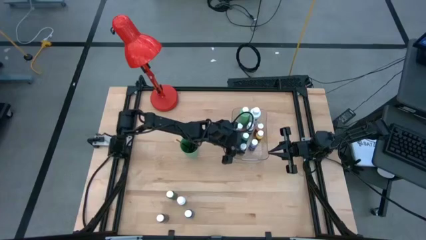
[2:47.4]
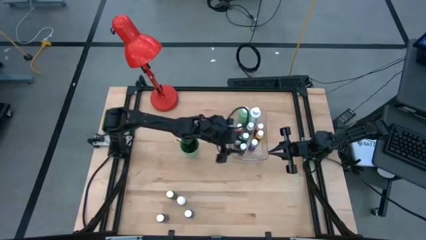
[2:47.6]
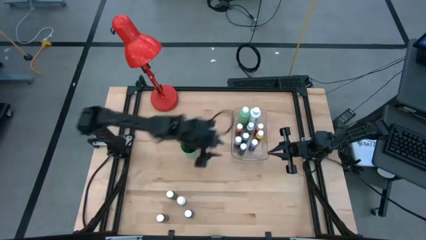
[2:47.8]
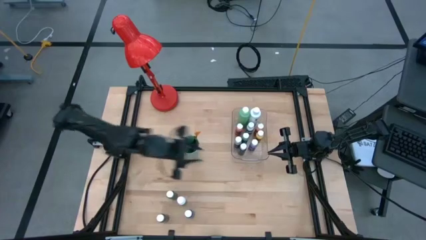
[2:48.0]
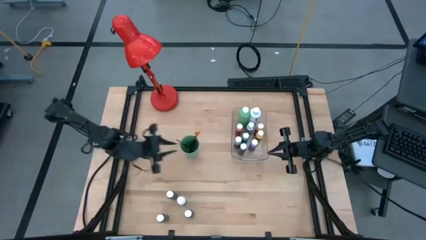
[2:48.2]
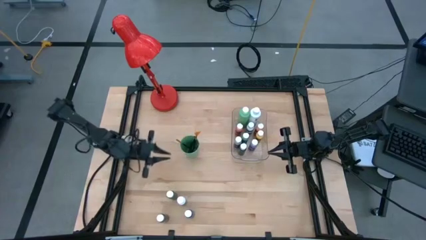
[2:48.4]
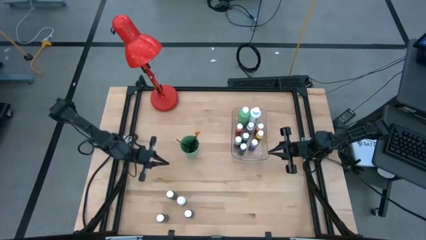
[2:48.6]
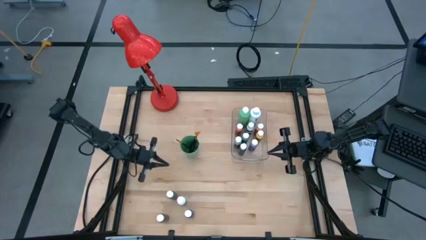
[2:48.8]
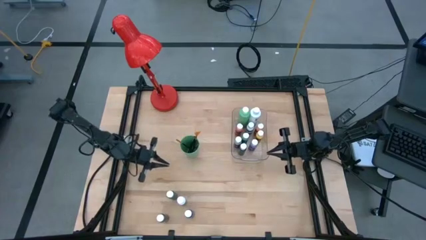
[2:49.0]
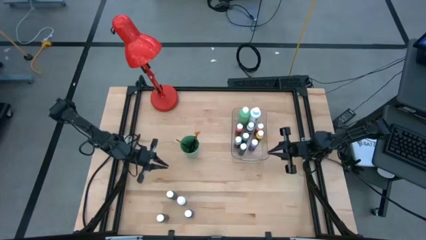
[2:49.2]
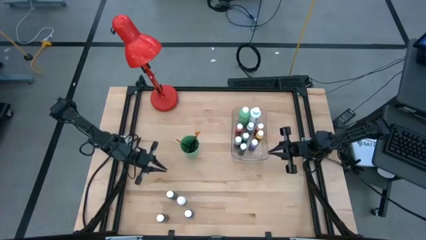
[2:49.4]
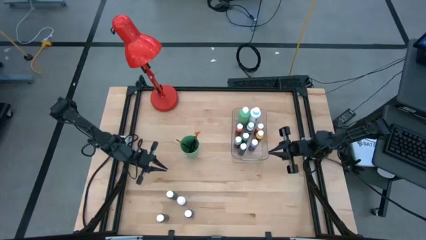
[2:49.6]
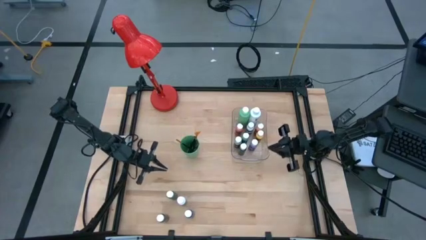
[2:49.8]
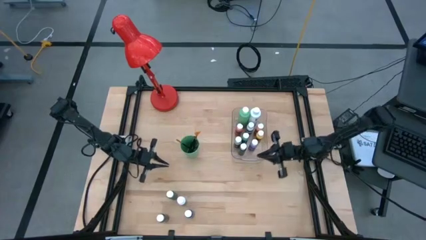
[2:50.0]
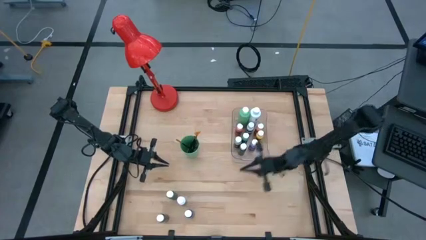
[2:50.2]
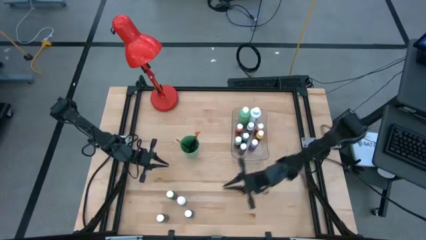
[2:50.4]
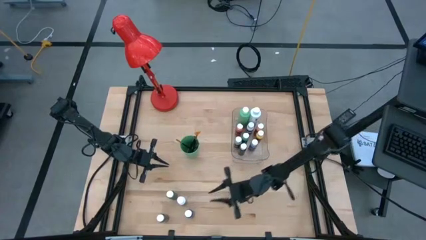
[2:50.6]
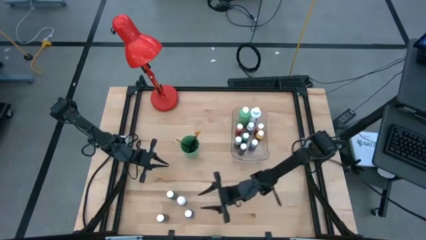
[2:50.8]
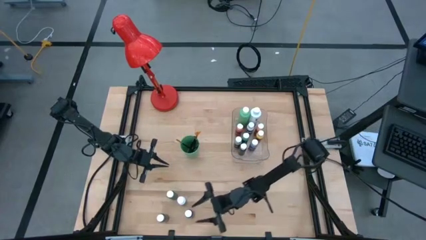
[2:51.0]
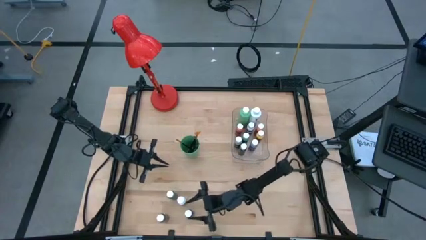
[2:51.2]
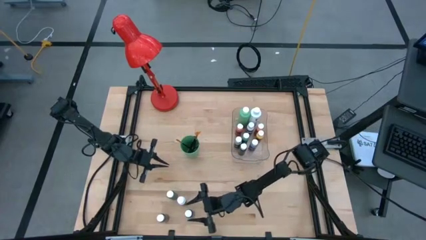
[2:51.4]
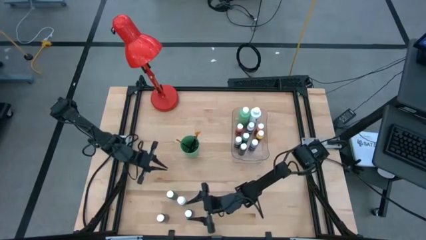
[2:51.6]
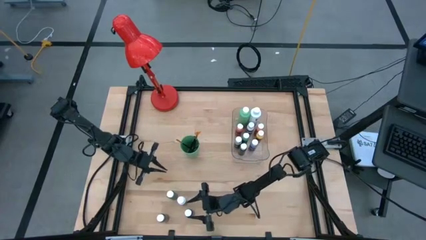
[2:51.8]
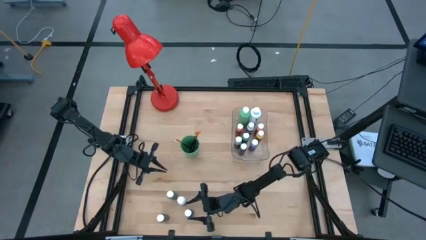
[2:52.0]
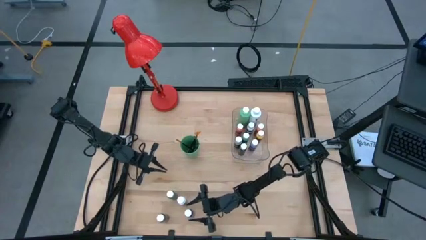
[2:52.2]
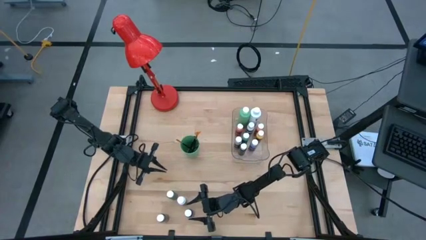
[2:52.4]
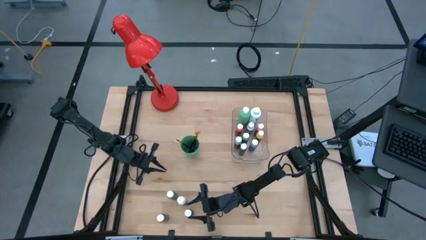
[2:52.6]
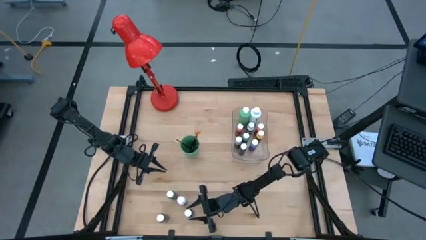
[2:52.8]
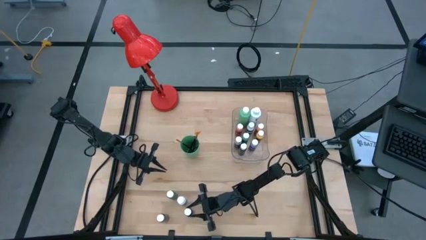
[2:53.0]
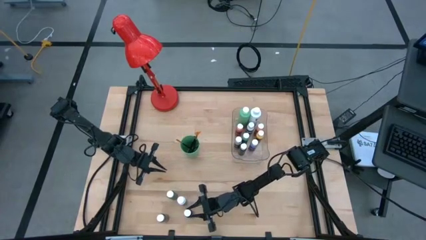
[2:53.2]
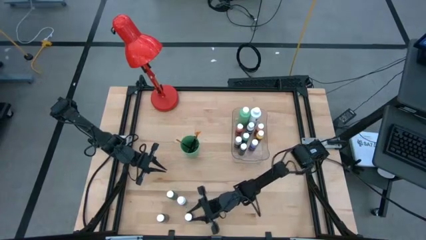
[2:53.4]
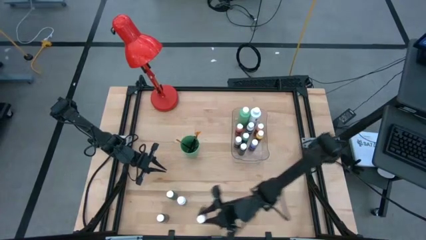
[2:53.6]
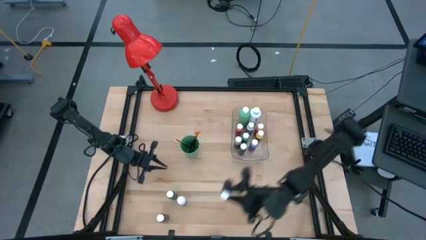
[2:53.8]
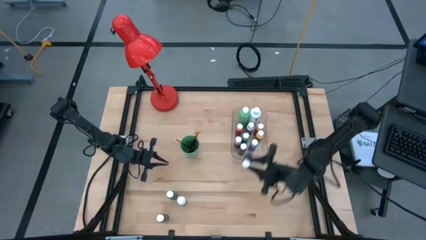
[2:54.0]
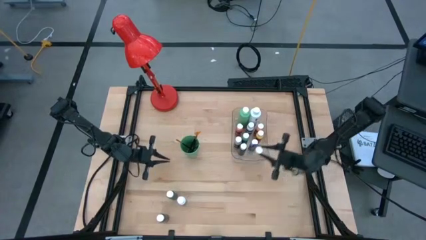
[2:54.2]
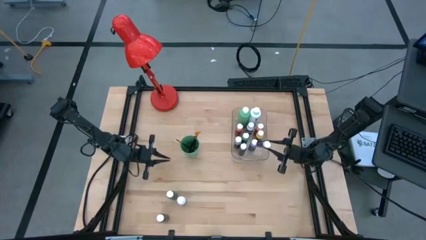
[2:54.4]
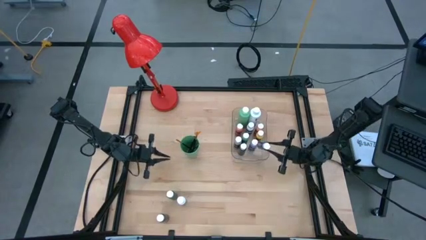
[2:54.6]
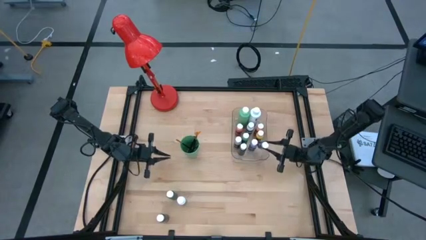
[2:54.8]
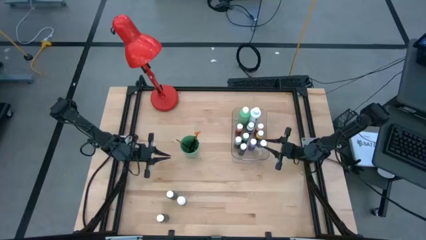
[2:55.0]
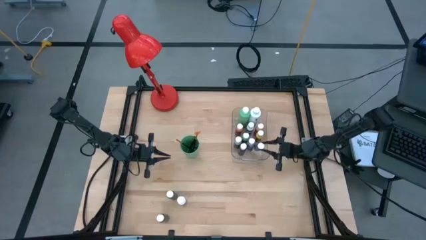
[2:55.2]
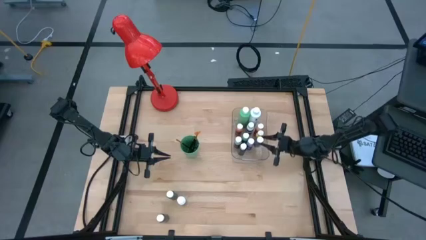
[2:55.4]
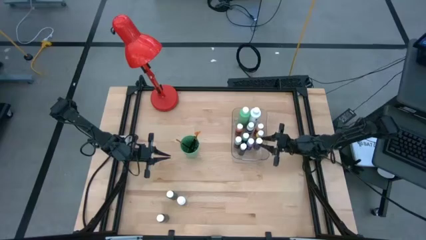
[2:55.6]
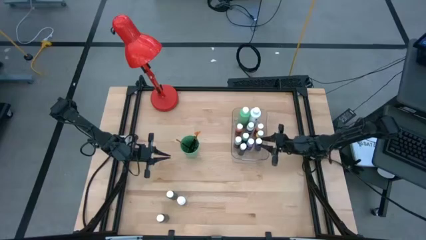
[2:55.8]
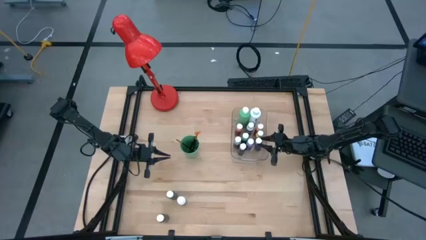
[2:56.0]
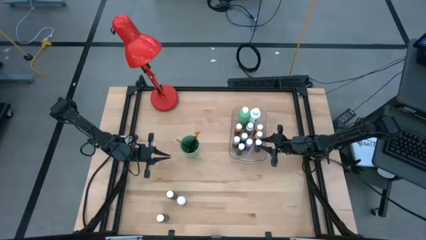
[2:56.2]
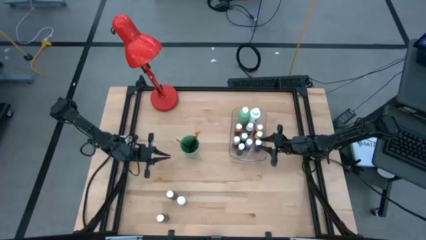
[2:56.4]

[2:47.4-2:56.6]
Task: Pick & Place Paint Supplies
Put the small blue paint bottle into the transparent bin

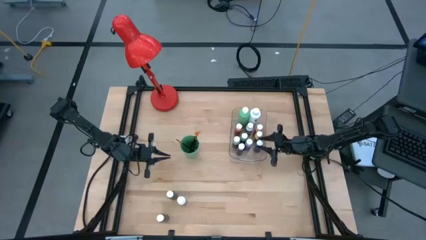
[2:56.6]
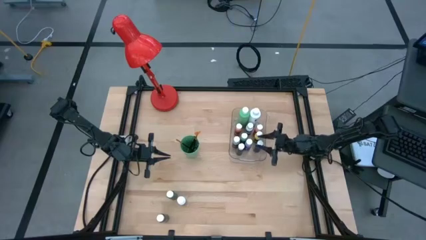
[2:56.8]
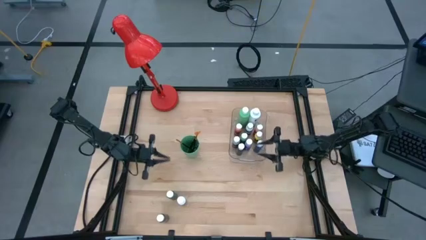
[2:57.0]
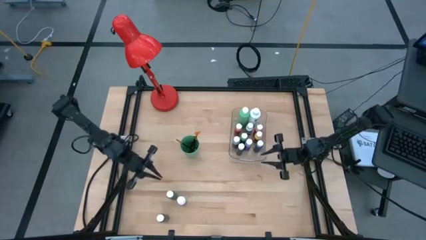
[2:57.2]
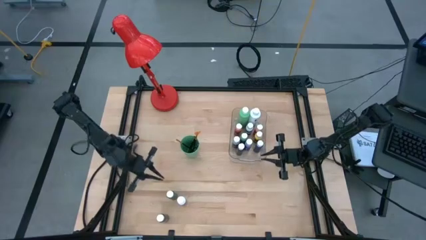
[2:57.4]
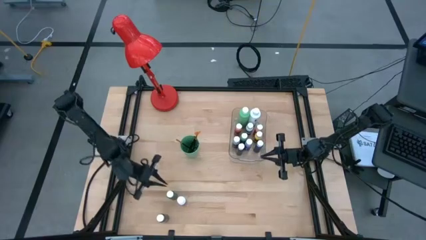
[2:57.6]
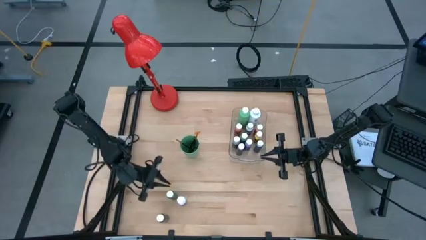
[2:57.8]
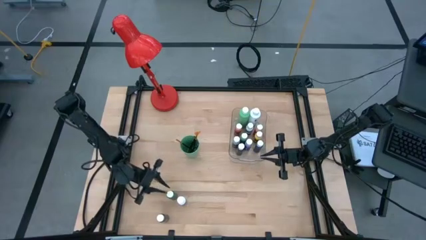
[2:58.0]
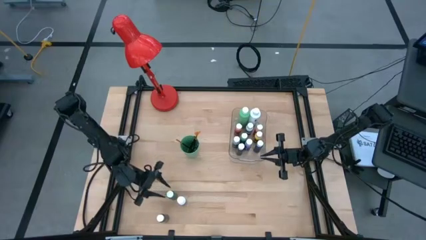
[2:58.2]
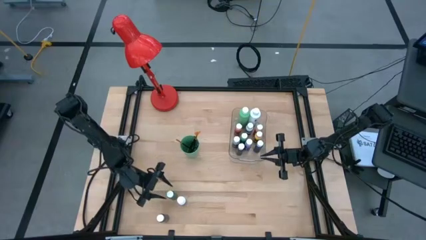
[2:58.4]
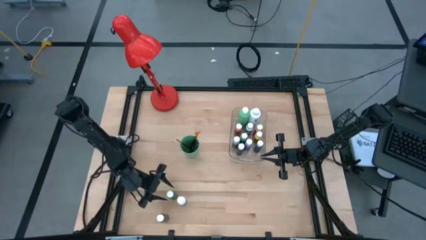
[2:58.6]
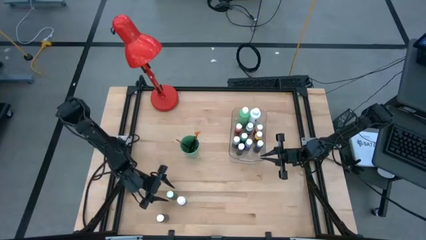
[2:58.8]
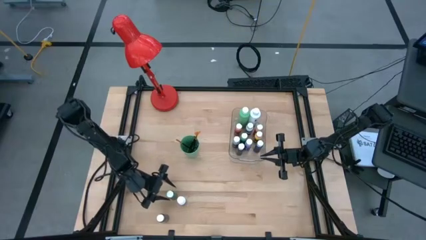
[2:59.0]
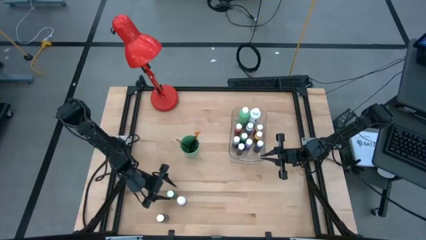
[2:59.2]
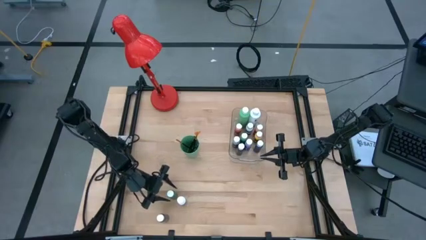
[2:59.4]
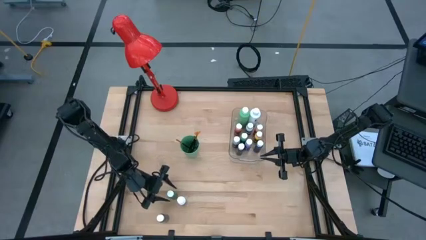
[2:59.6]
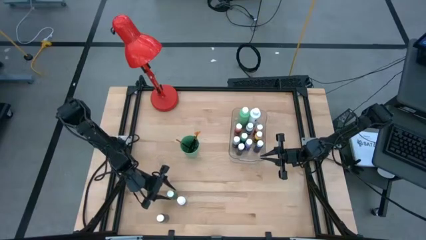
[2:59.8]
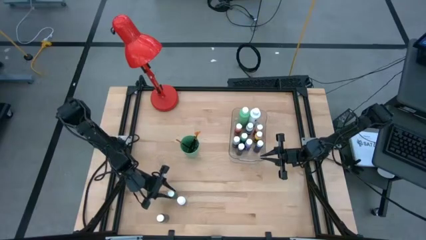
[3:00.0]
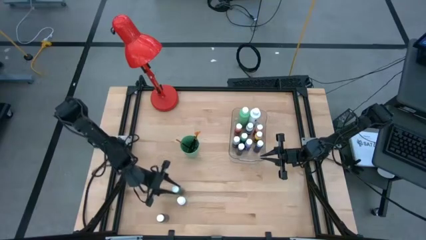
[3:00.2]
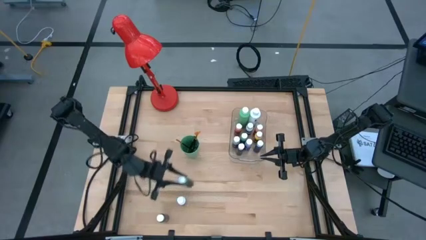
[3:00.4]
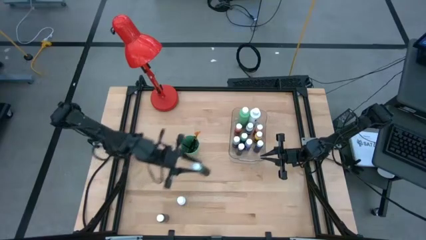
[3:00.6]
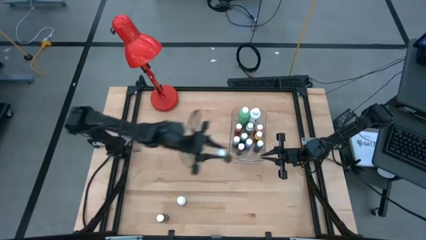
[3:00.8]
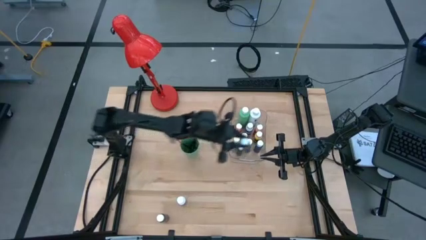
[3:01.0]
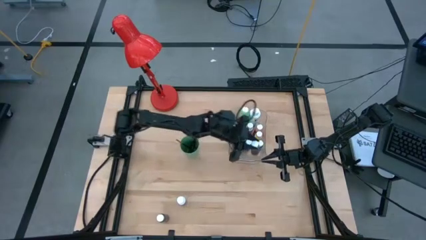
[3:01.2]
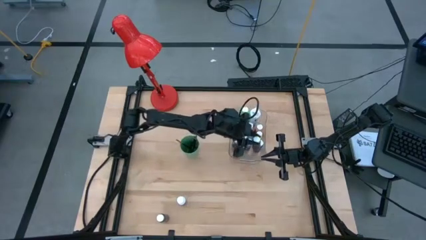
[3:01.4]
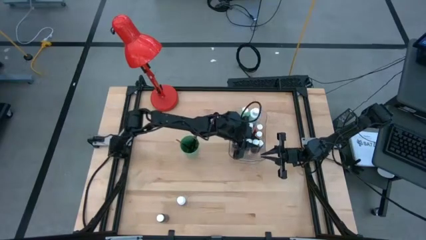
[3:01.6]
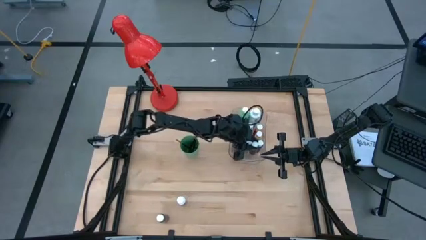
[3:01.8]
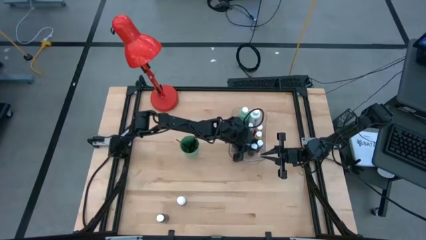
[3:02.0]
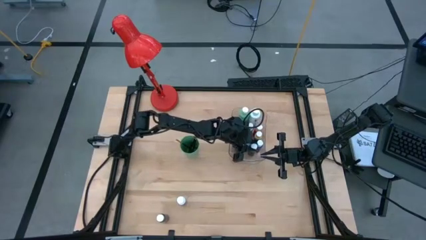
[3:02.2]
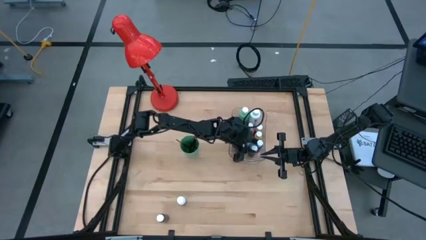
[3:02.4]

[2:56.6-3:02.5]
Put the small dark green paint bottle into the transparent bin
